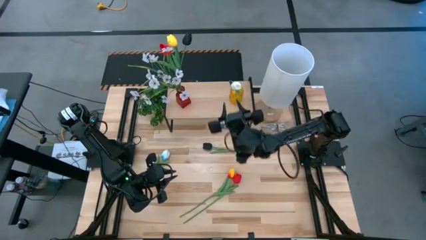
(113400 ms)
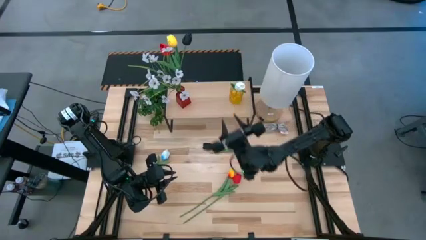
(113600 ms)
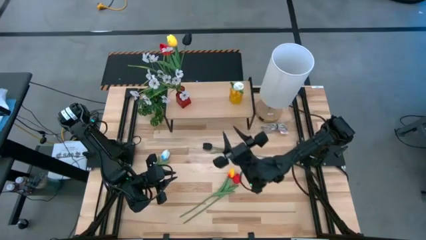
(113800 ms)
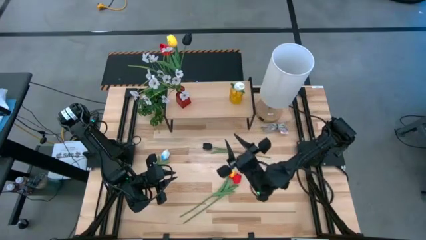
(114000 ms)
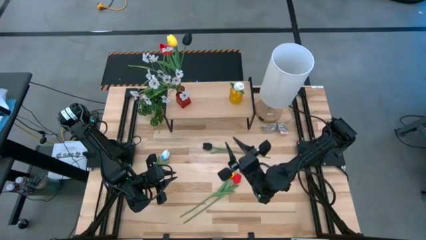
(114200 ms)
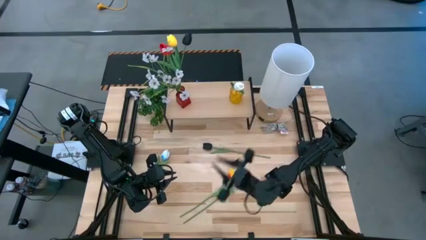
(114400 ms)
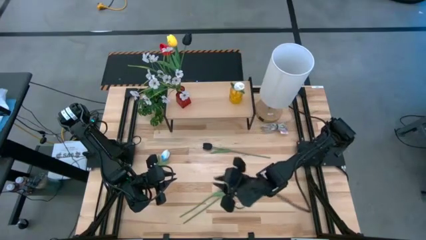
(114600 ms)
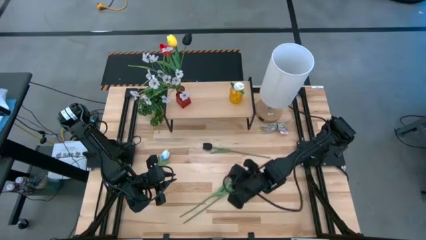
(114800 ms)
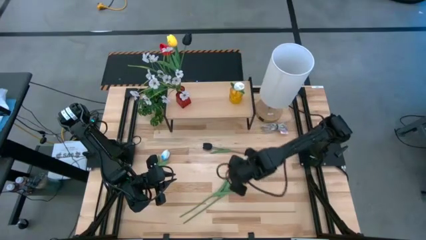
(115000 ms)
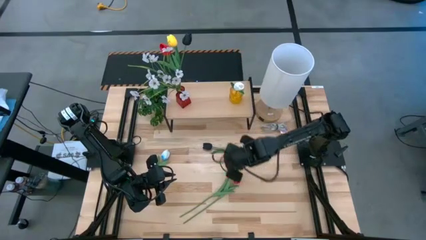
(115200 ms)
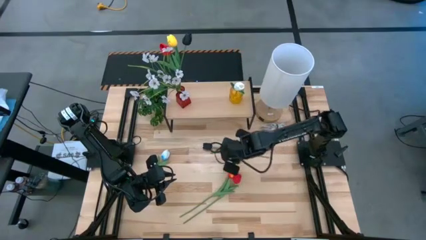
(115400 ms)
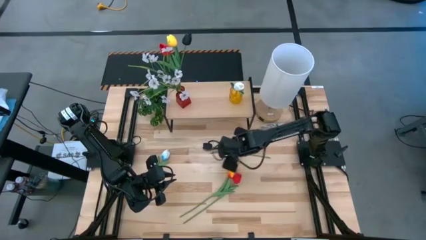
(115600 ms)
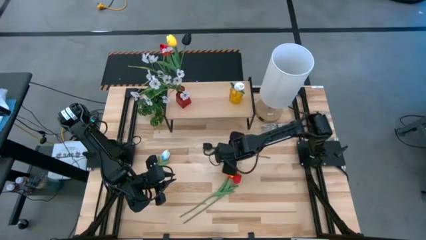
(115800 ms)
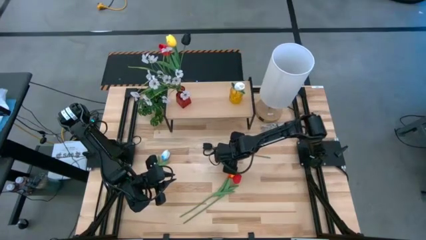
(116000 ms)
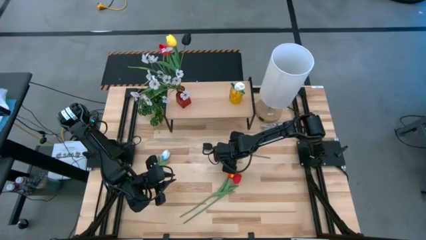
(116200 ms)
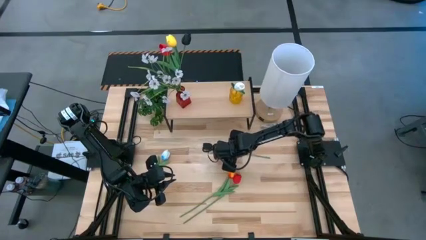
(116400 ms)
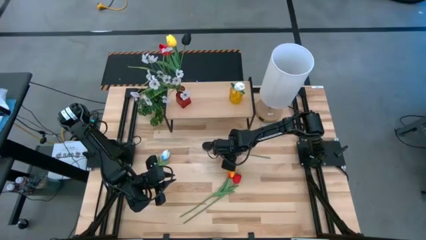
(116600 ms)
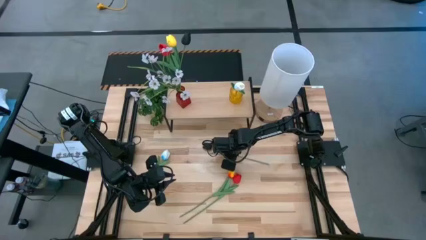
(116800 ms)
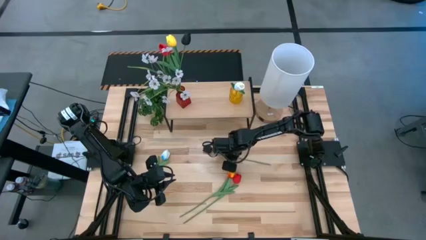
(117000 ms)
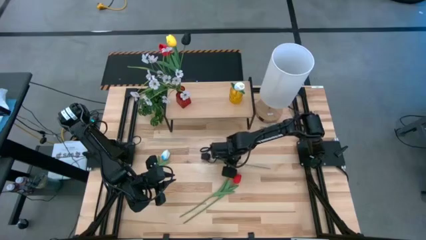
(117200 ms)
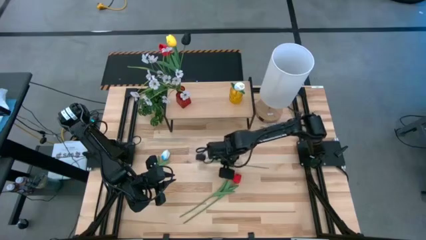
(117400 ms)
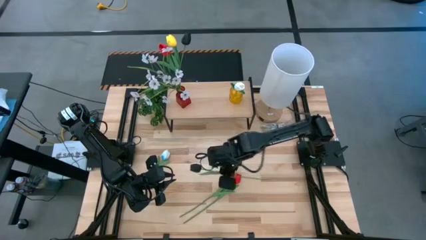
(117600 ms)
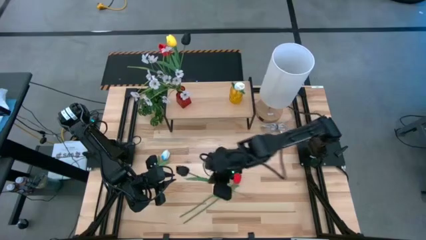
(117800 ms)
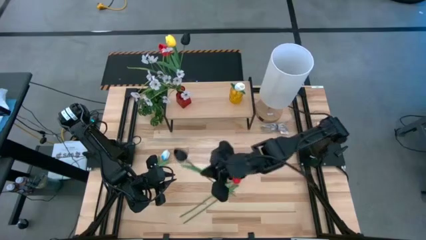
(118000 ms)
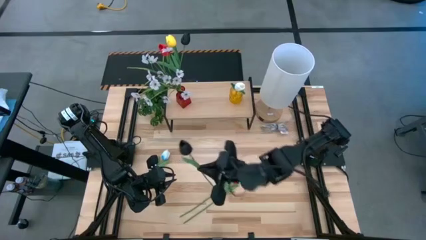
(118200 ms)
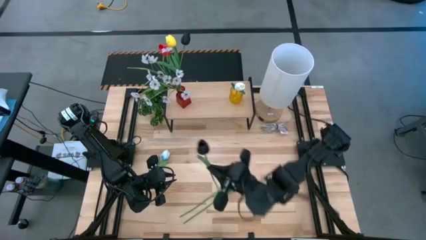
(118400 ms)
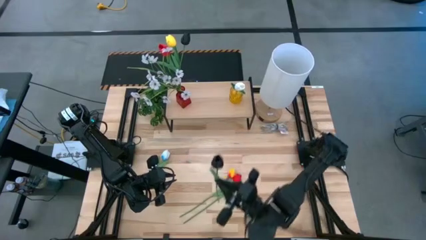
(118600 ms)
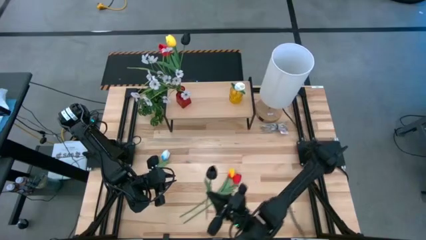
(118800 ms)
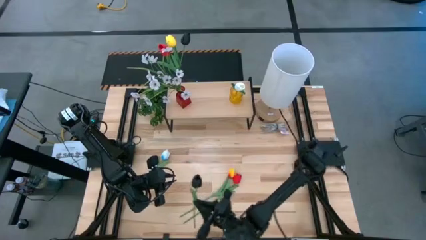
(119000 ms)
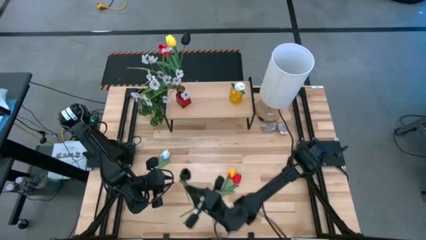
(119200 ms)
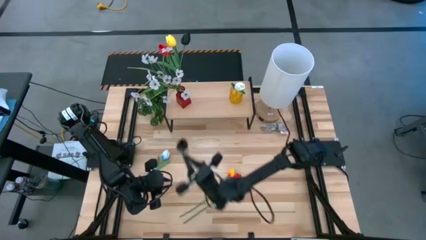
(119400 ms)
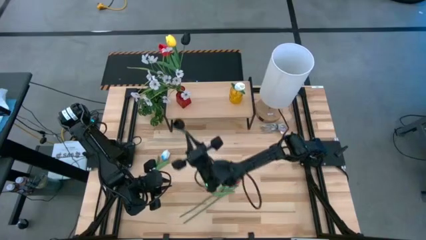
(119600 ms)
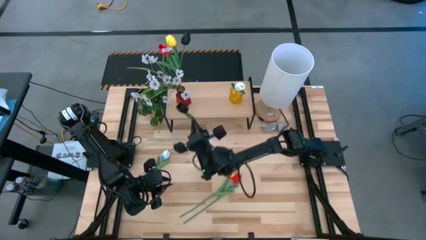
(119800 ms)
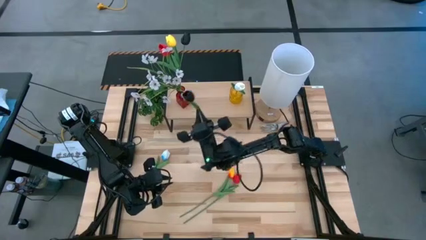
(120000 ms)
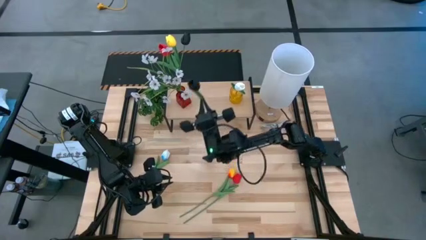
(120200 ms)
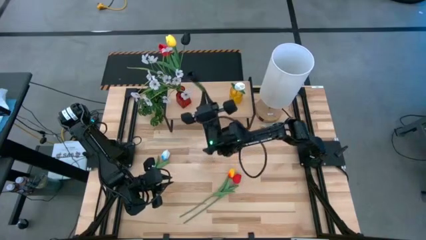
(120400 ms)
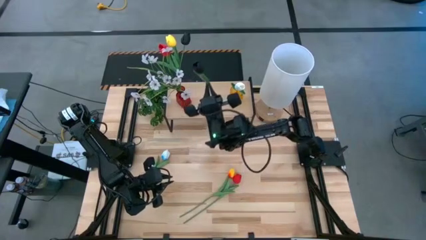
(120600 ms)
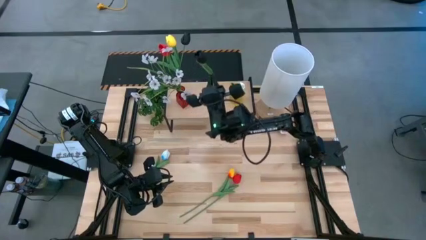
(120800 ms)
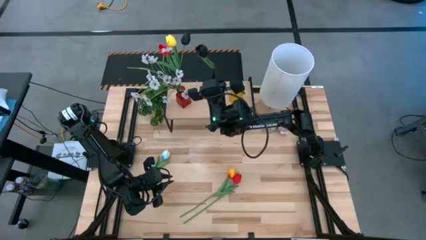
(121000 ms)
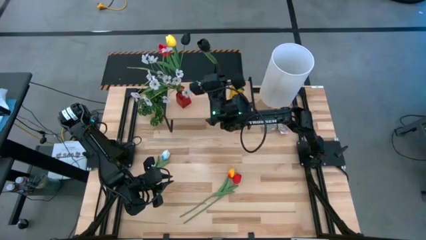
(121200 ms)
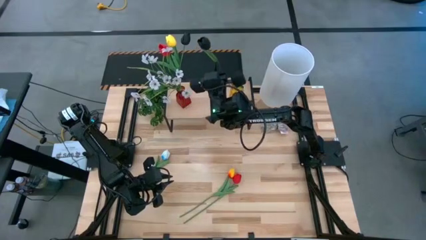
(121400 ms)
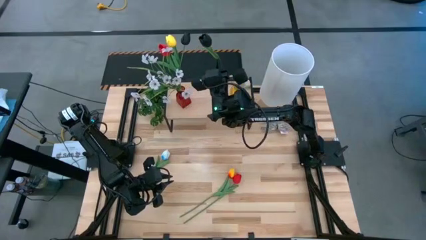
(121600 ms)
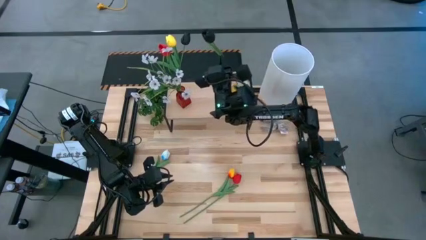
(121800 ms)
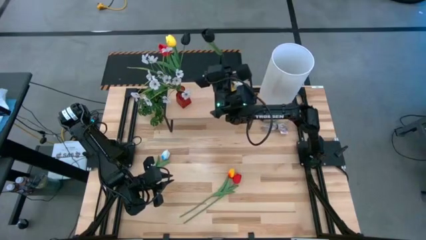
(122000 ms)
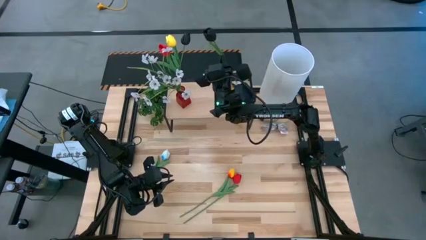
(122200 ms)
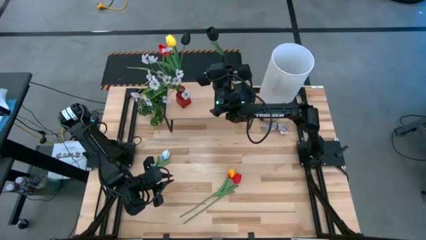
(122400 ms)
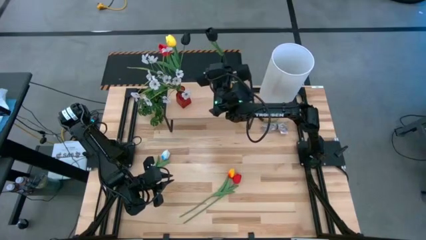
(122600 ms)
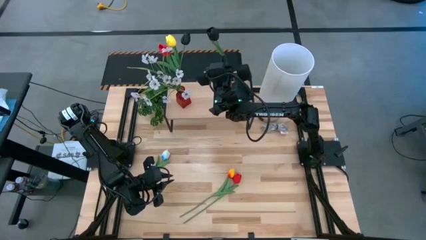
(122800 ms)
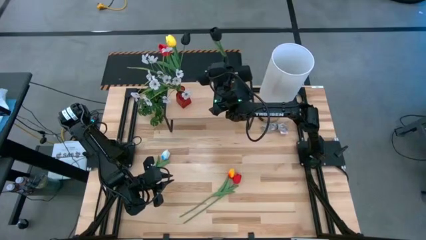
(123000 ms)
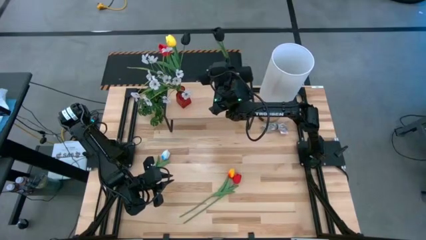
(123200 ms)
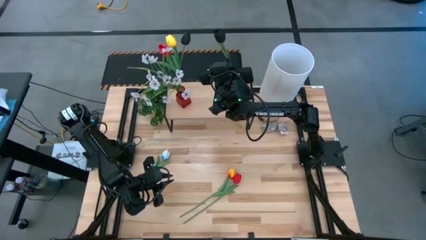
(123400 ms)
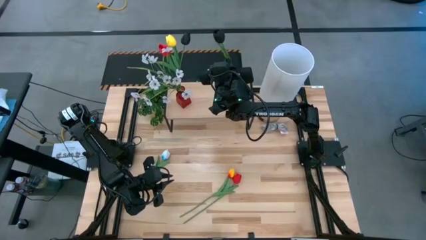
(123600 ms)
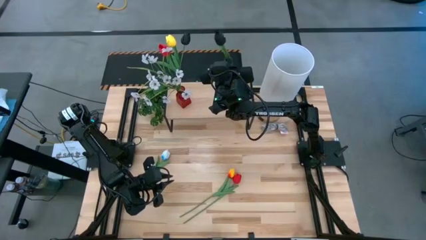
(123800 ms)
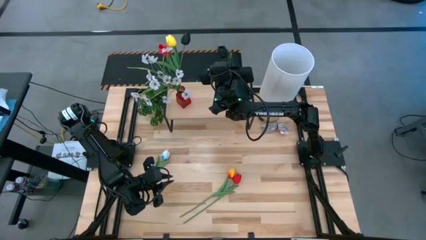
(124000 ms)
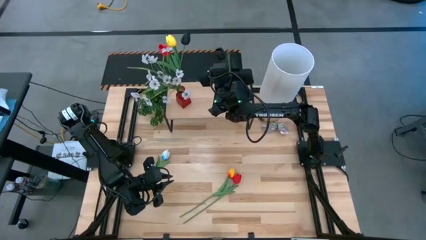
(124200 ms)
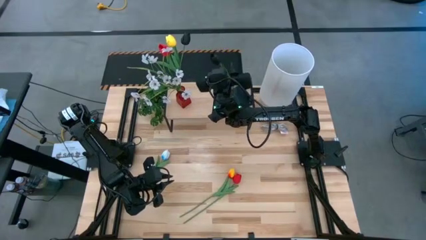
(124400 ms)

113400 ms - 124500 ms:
Task: Pick and place flowers into a vace then onto a shelf
Put the black flower into the yellow vase on the shelf
